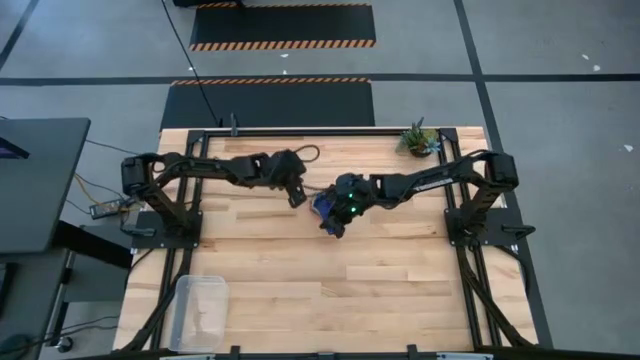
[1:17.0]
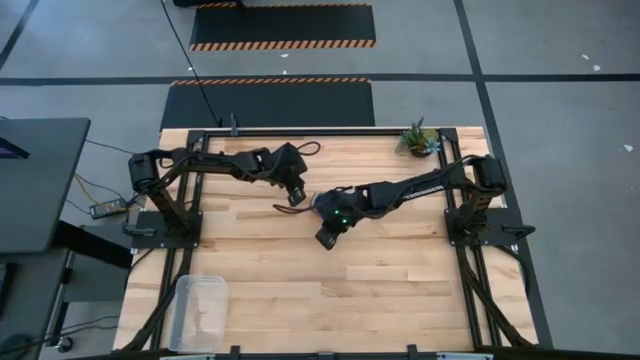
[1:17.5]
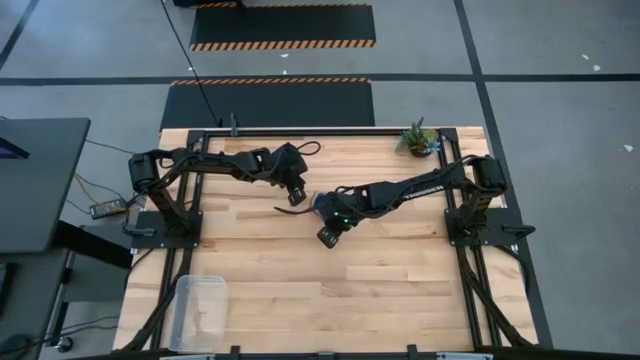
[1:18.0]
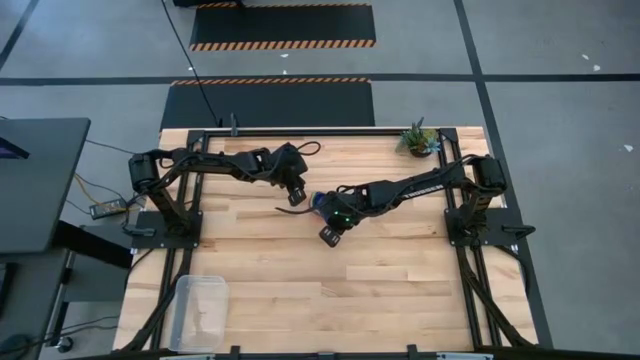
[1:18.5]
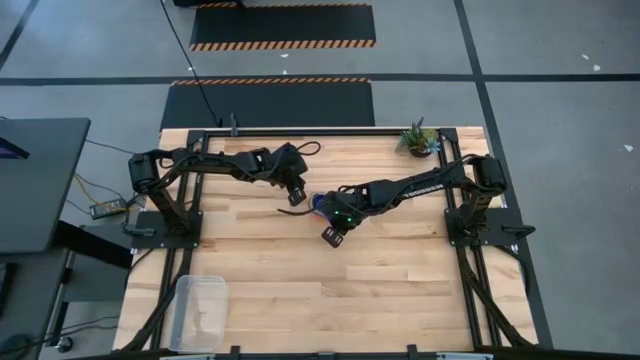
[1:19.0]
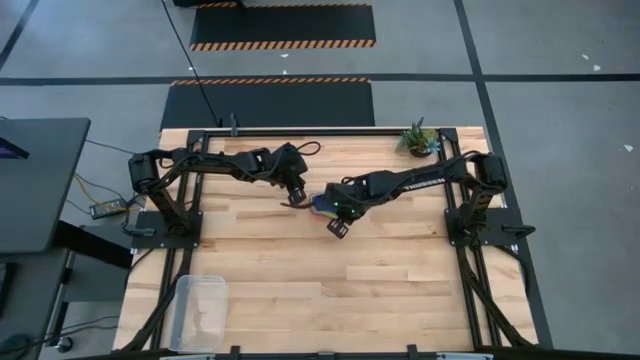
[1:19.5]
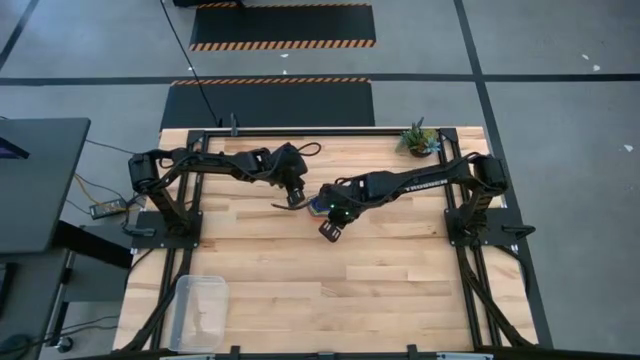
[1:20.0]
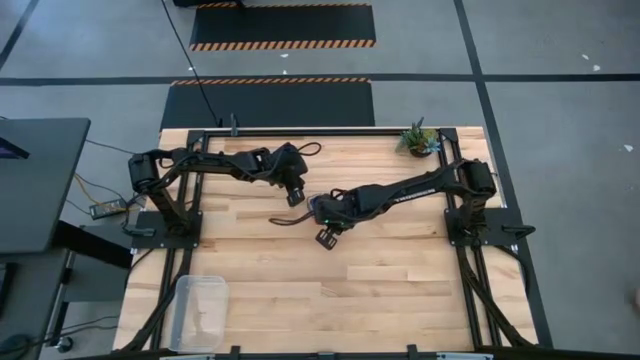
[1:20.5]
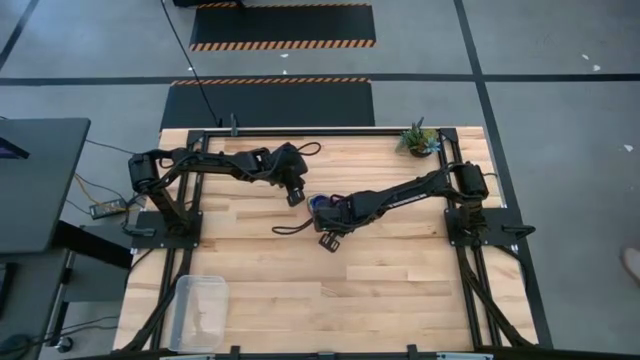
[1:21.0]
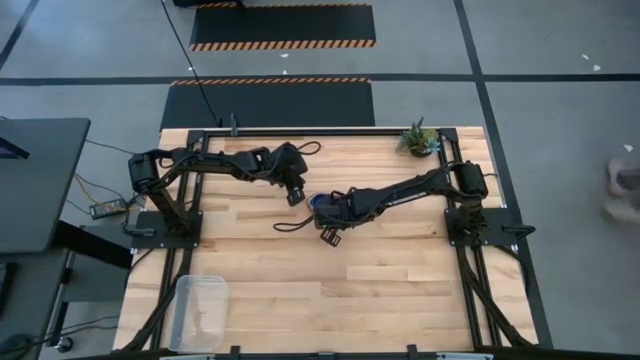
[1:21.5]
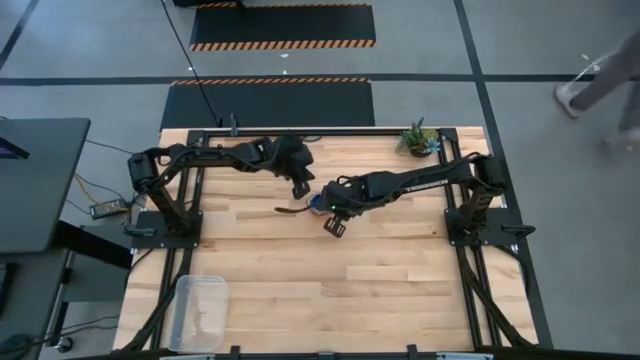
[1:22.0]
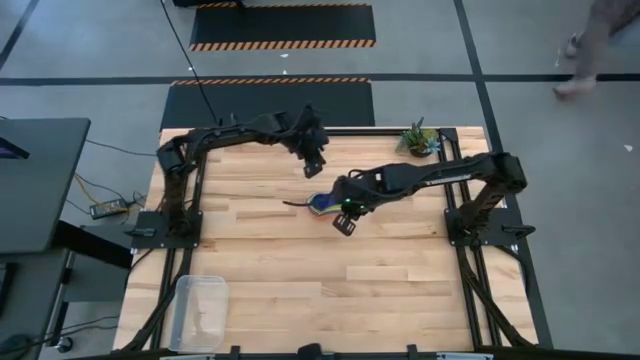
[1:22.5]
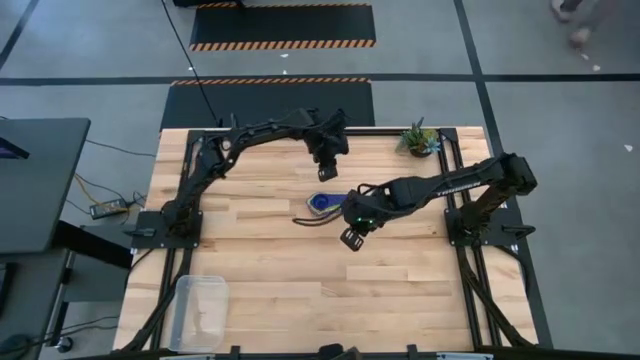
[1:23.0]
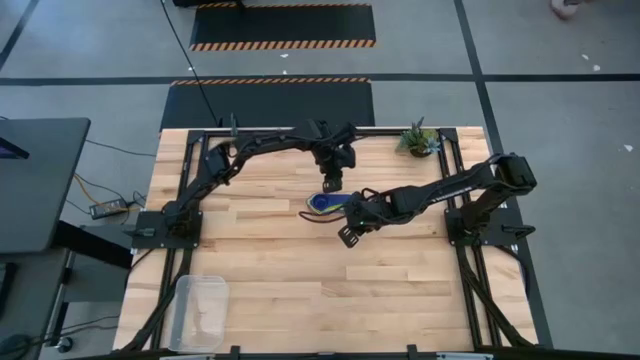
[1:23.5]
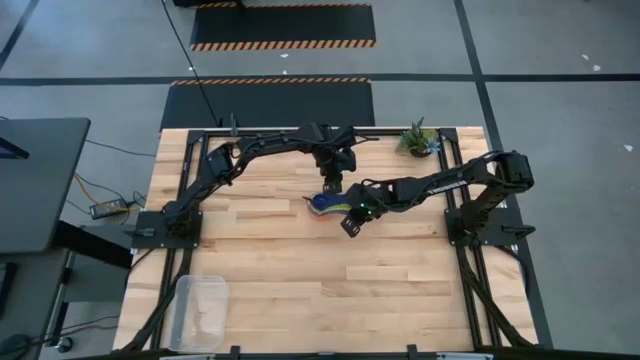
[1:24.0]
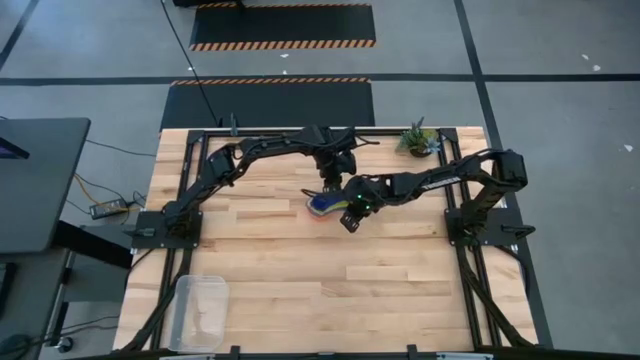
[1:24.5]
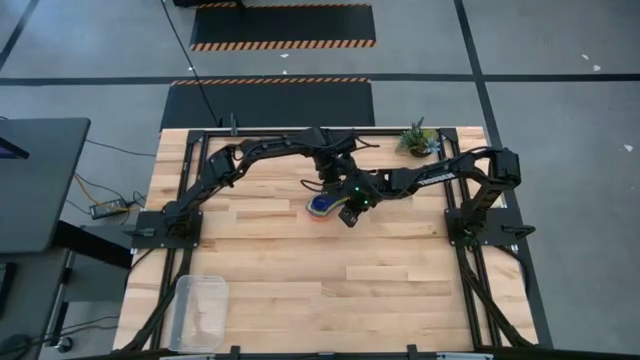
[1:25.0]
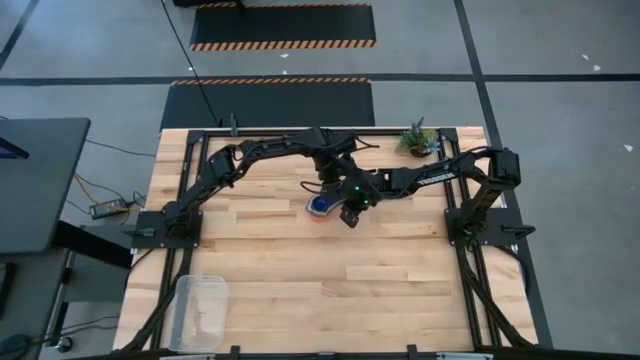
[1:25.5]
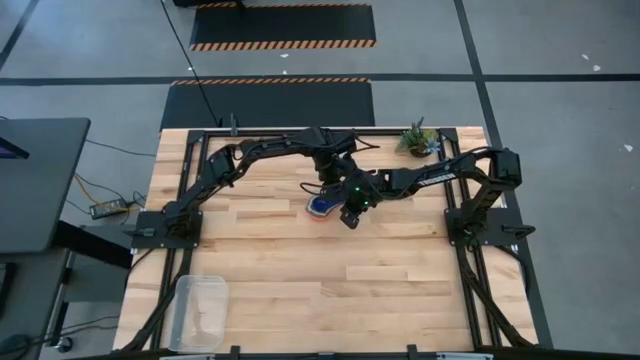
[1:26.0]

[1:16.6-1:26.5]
Task: Nest measuring cups in basket
Adjust the measuring cups

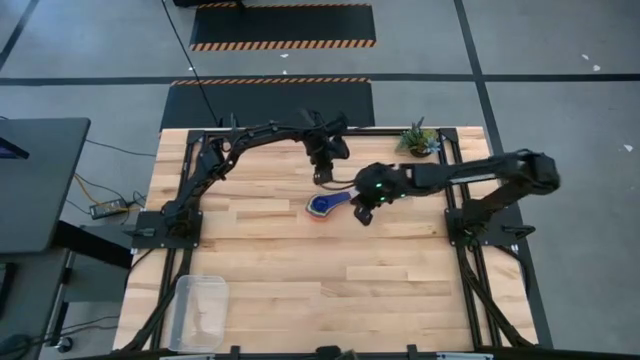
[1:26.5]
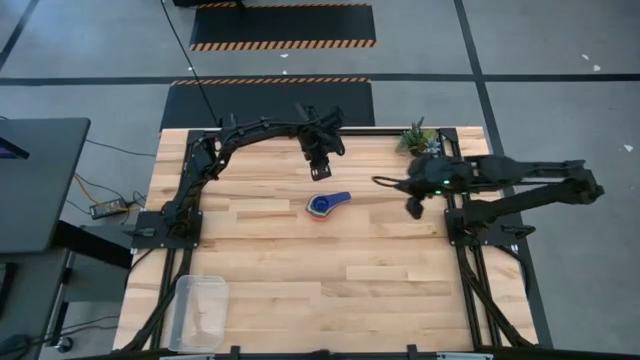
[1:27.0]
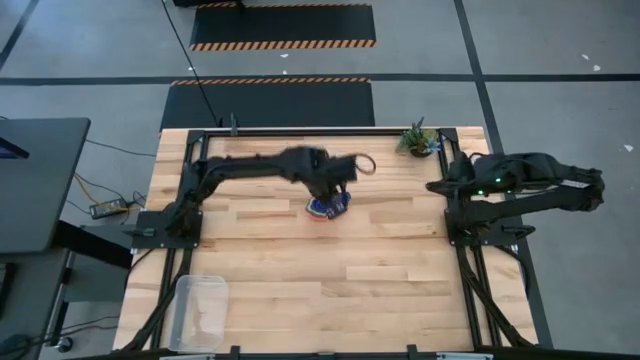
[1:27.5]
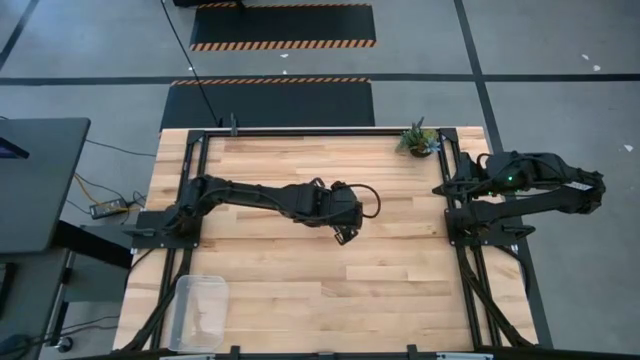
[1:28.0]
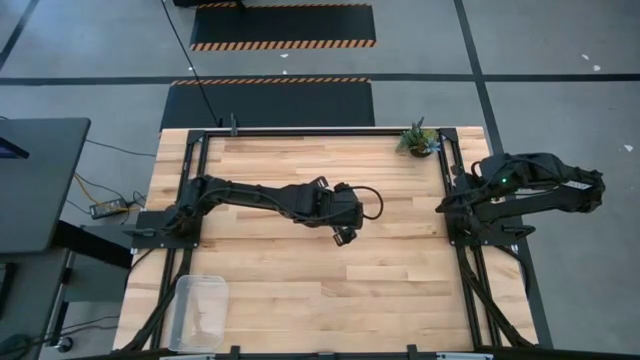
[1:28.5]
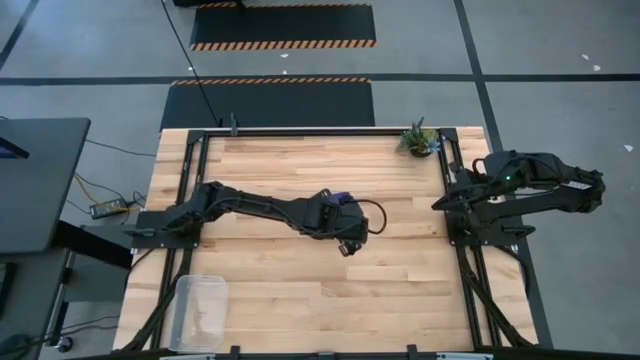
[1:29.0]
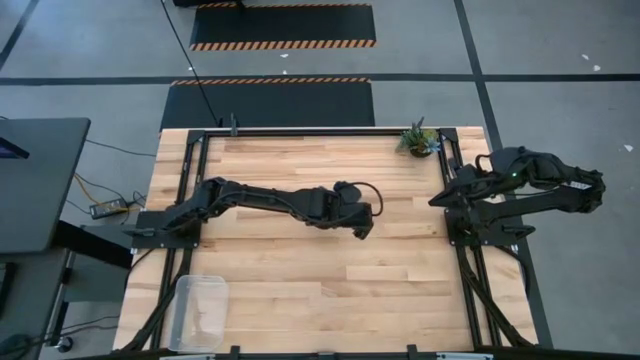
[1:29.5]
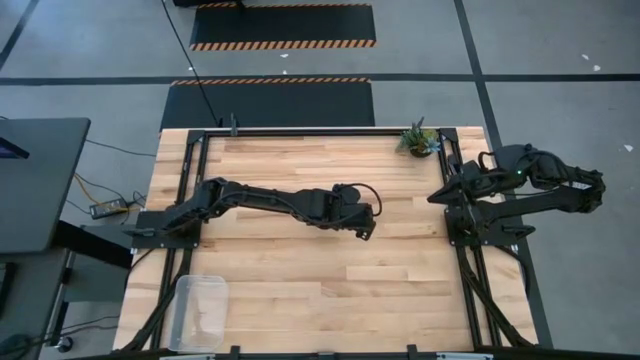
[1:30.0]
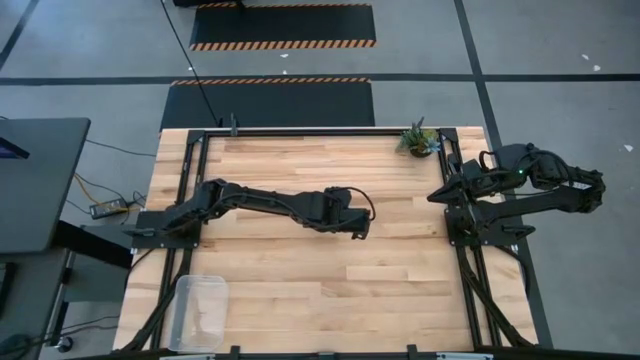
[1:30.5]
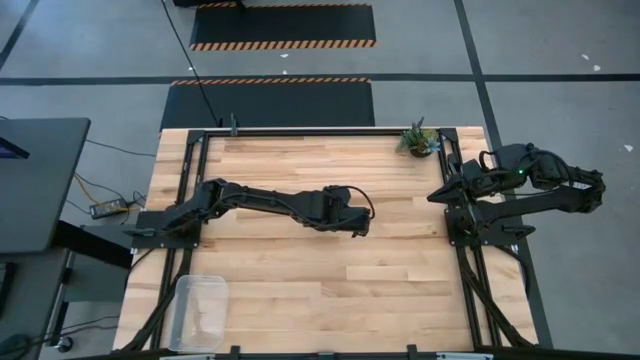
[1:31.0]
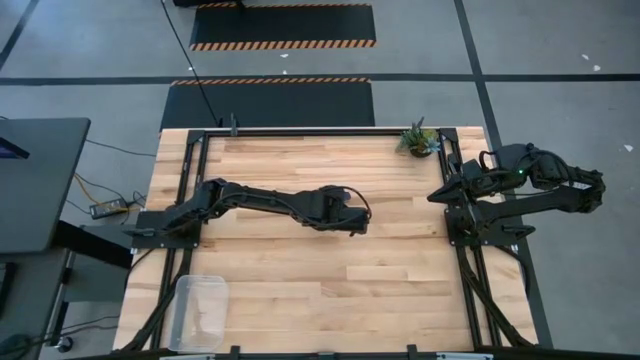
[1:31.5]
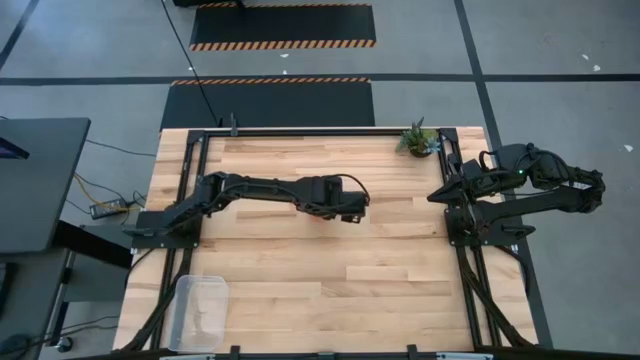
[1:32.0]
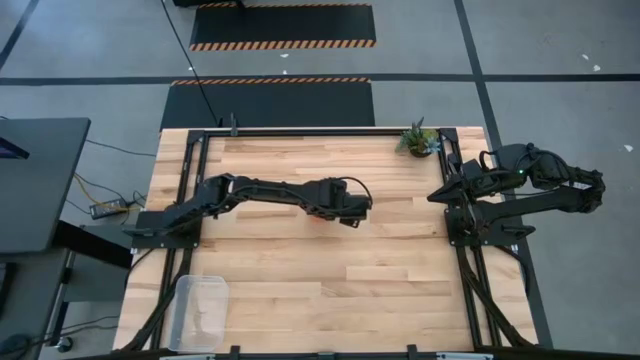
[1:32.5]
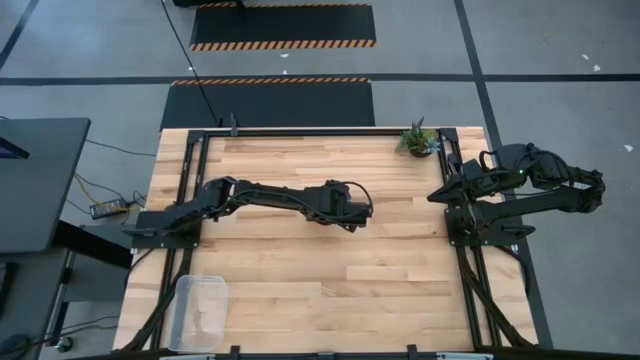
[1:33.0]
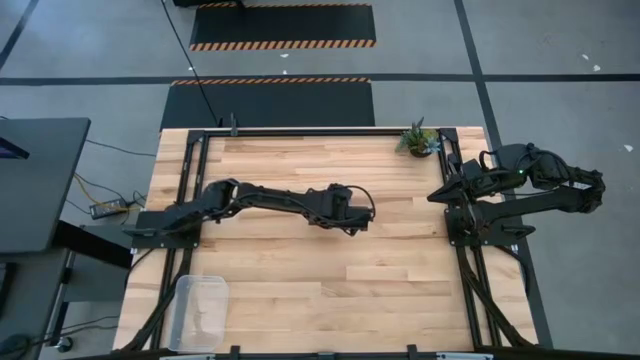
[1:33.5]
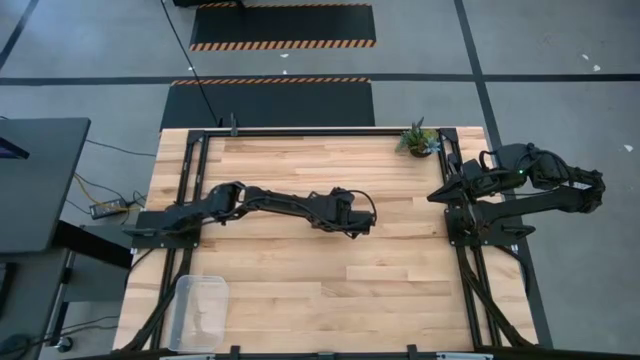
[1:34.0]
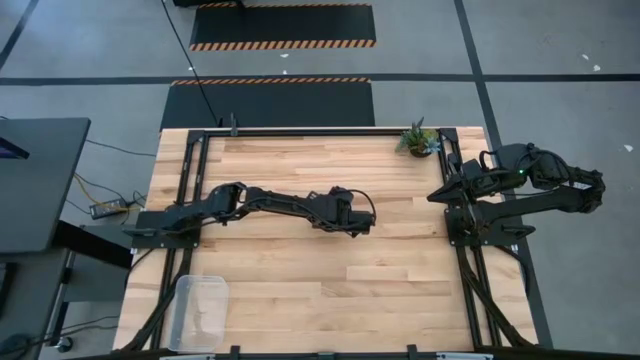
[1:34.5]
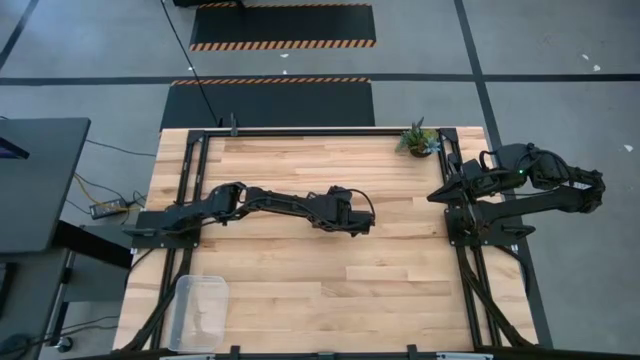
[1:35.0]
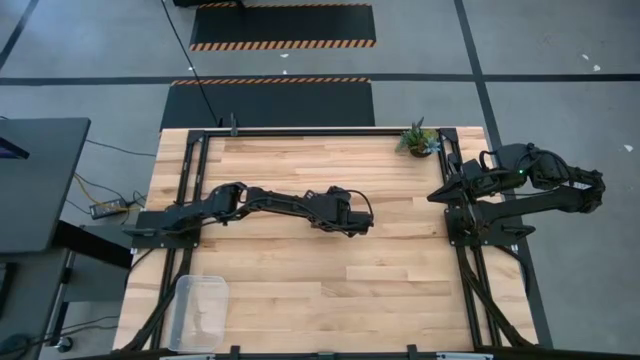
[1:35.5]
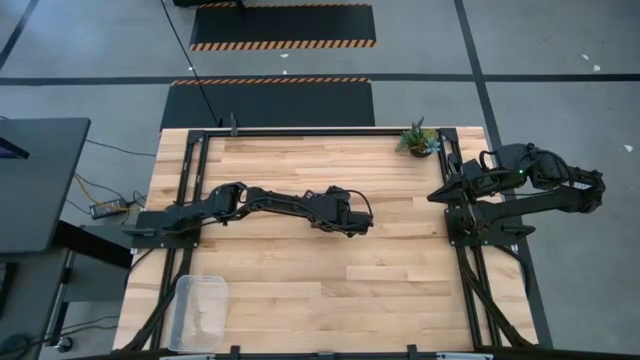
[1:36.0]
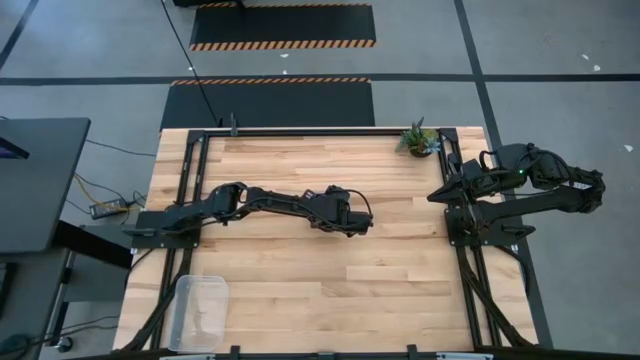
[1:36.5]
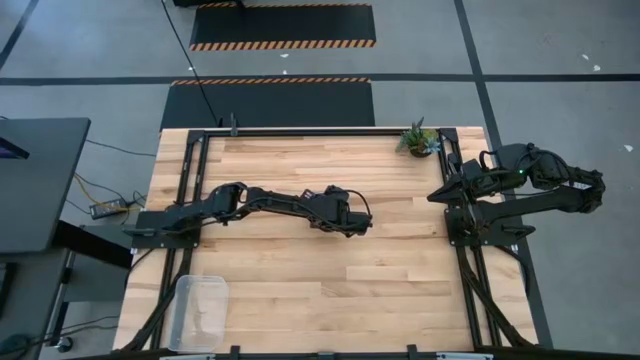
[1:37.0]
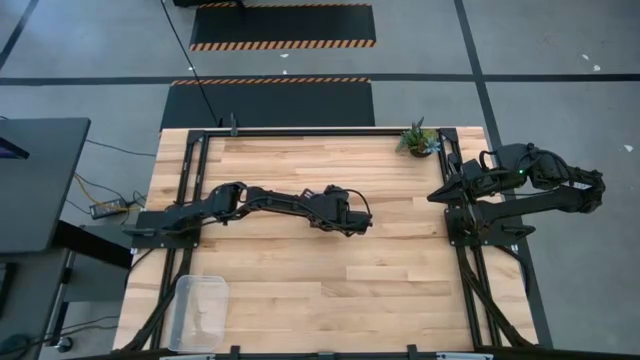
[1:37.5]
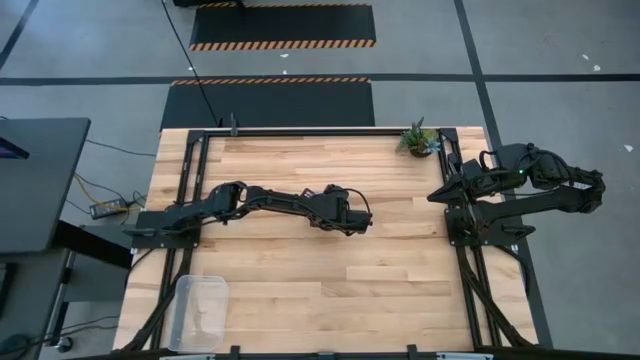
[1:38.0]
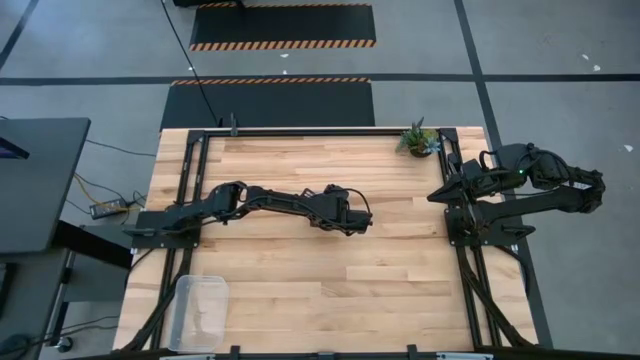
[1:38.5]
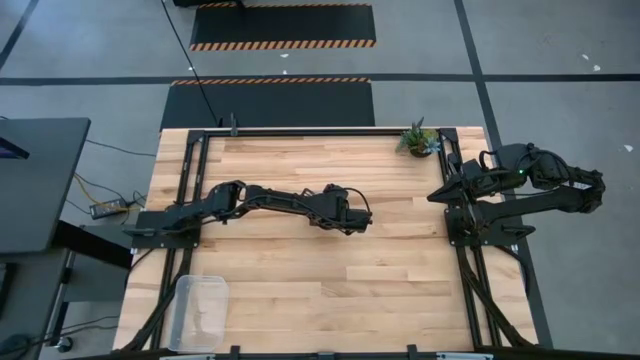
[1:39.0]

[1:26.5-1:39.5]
Put the stacked measuring cups into the transparent bin
